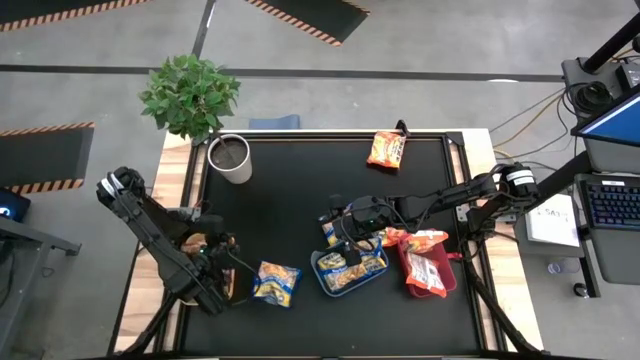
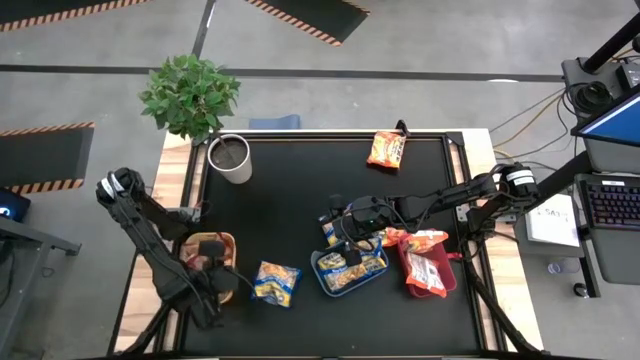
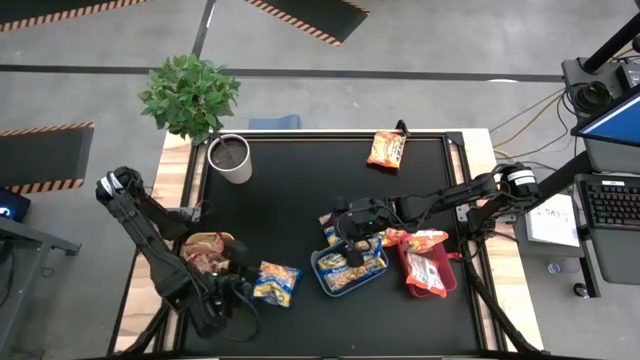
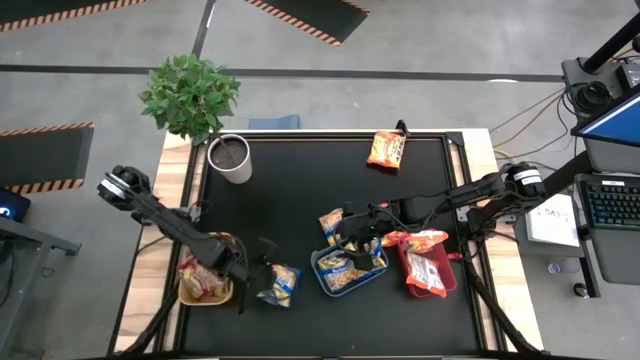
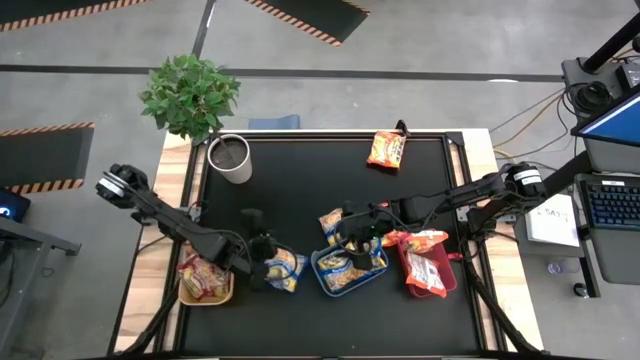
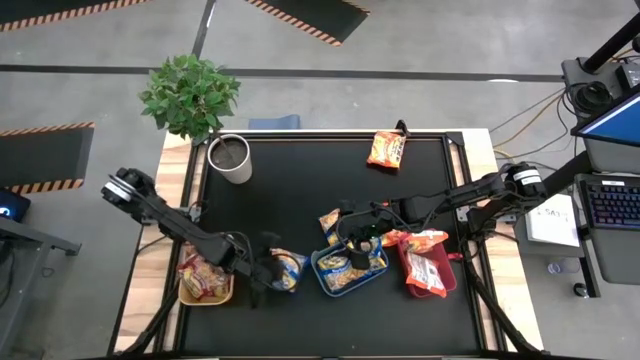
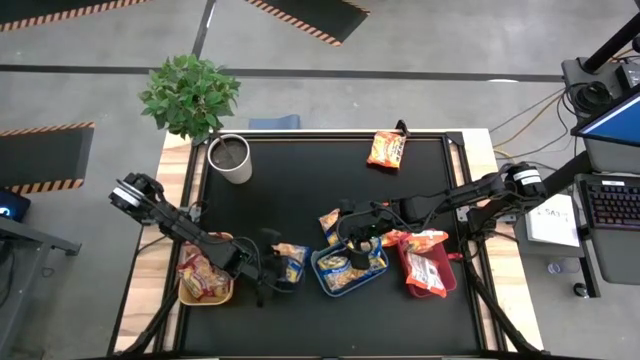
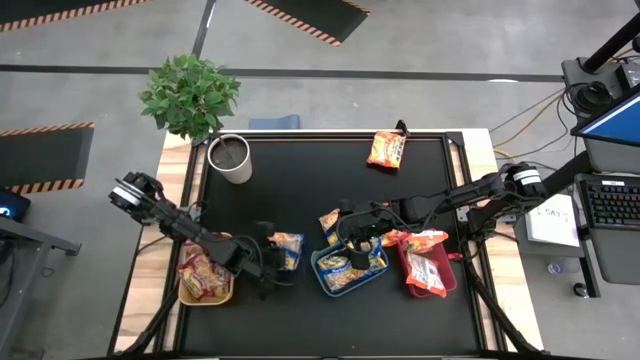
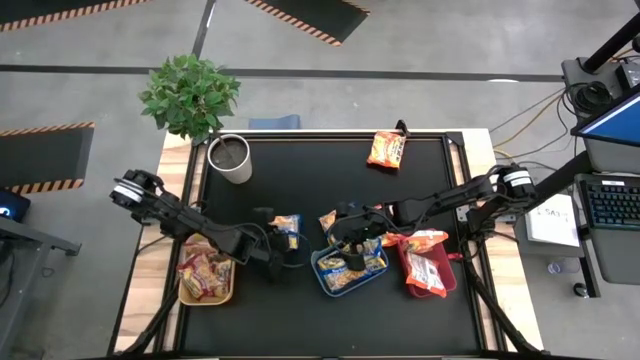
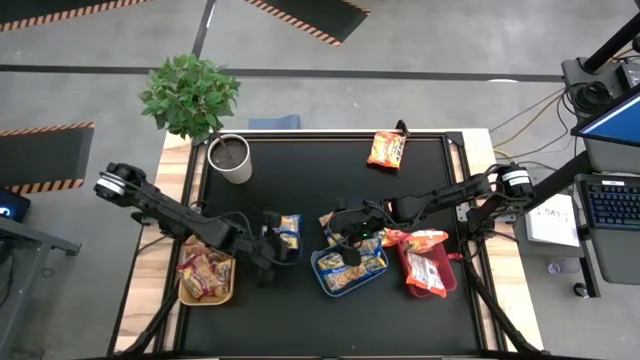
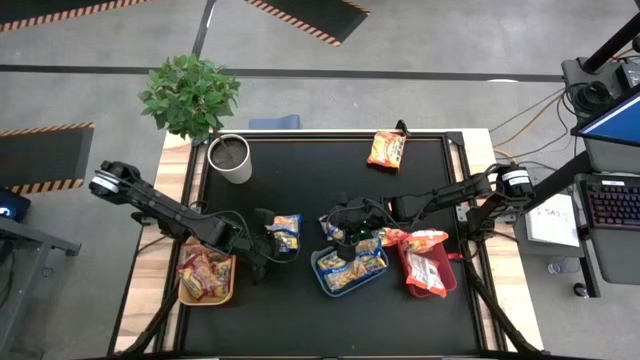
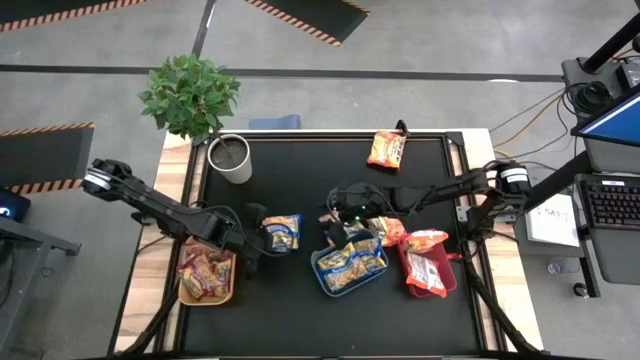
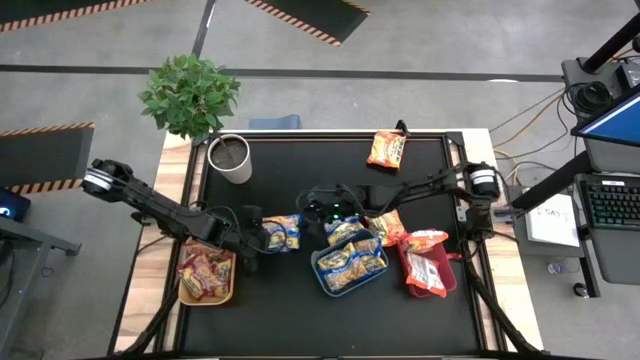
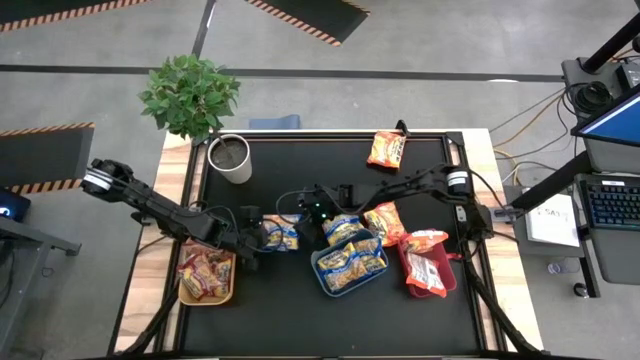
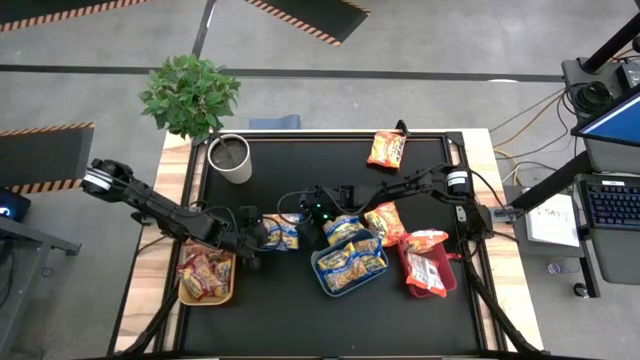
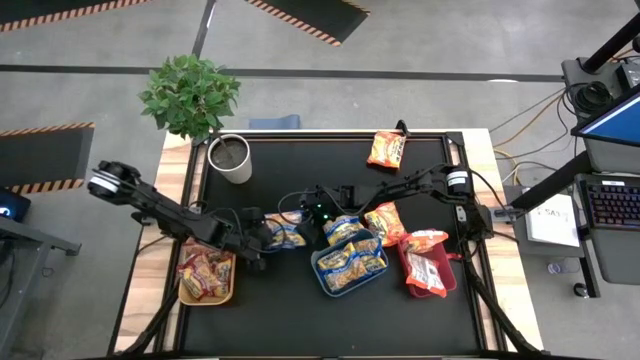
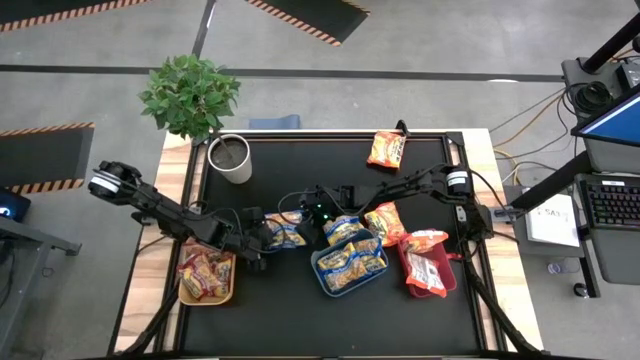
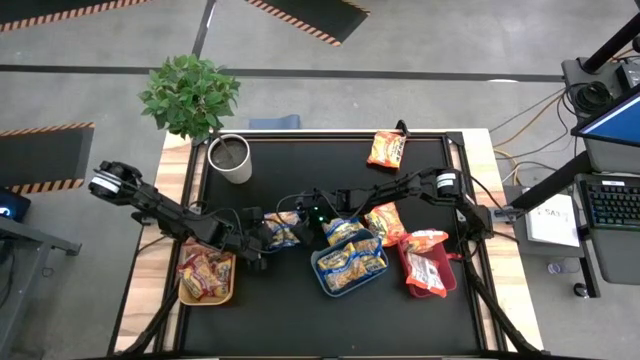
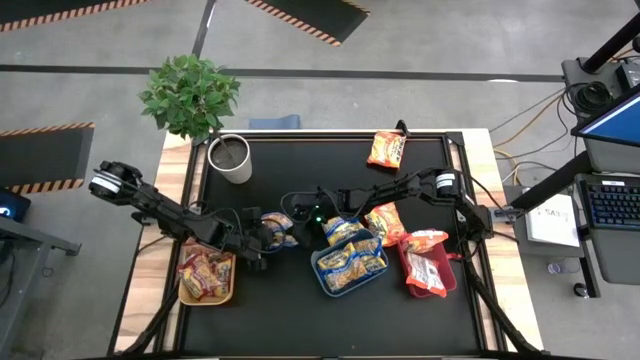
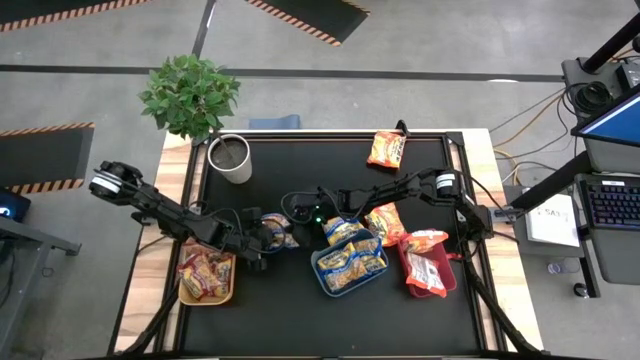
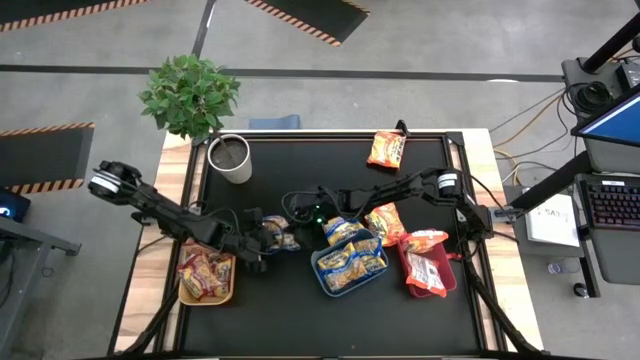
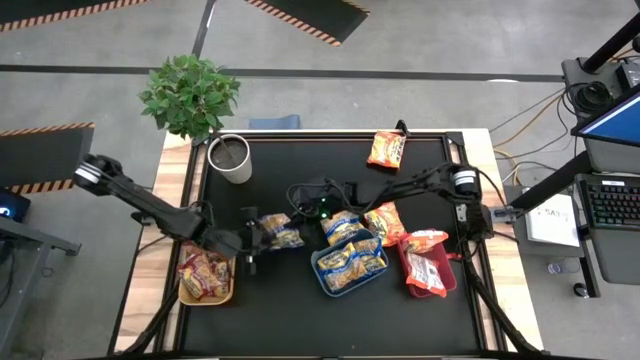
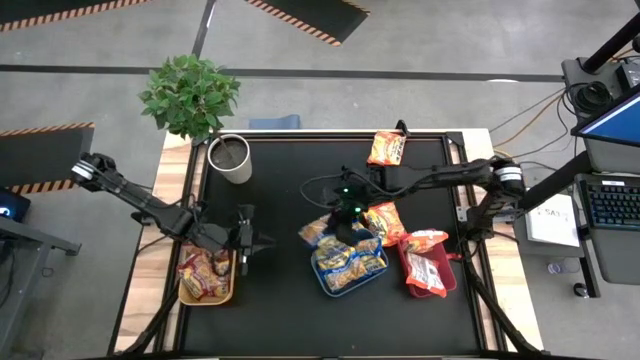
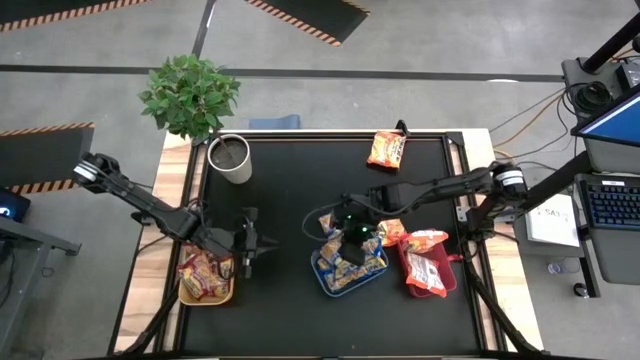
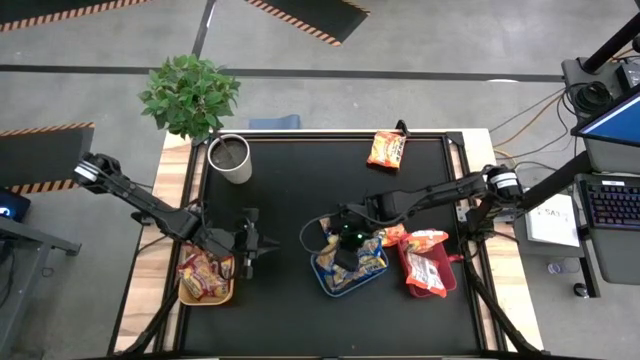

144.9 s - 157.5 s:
Task: Sort Maruchan noodles
Put the left blue noodle pack into the blue bin
